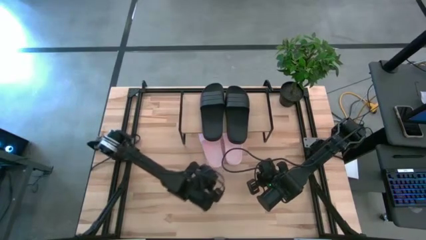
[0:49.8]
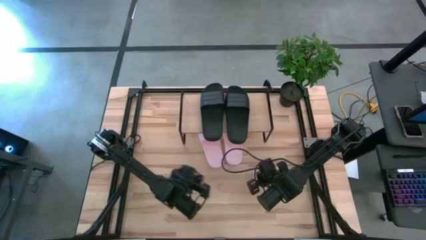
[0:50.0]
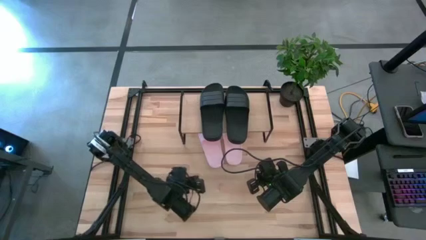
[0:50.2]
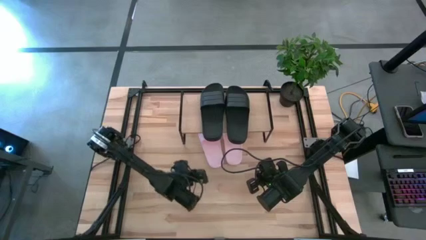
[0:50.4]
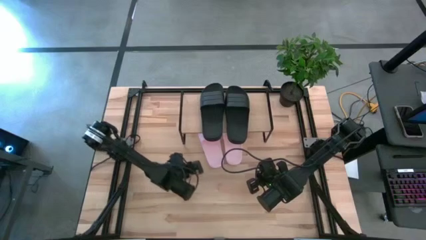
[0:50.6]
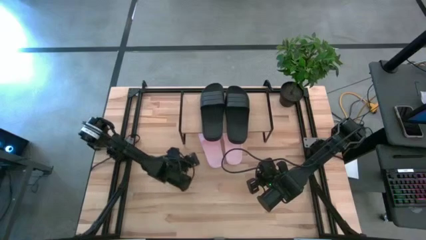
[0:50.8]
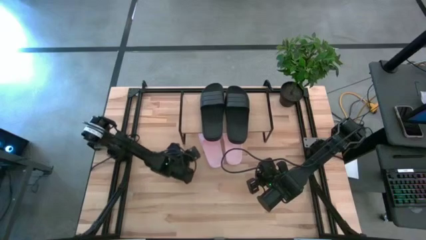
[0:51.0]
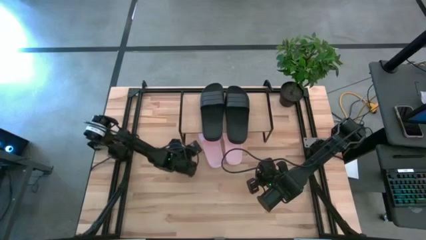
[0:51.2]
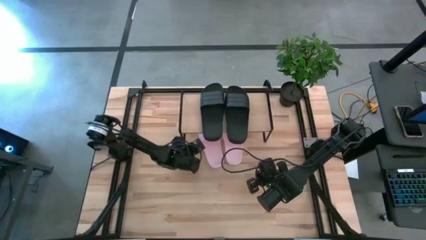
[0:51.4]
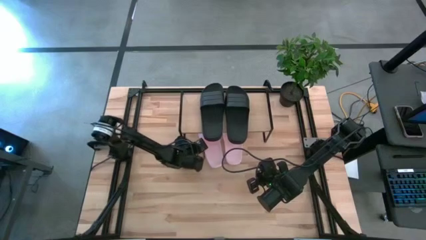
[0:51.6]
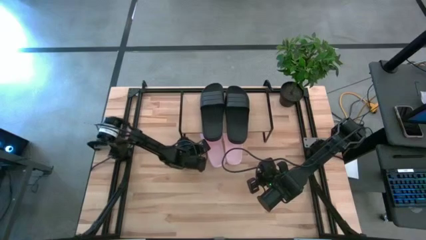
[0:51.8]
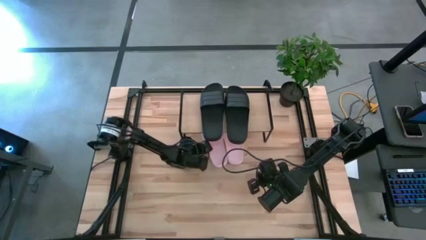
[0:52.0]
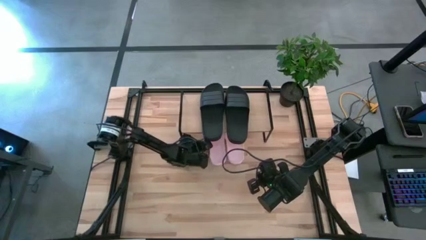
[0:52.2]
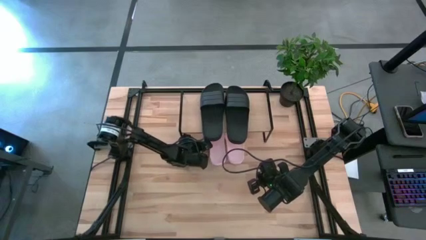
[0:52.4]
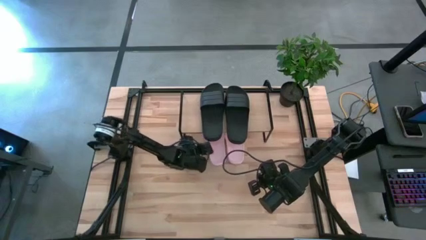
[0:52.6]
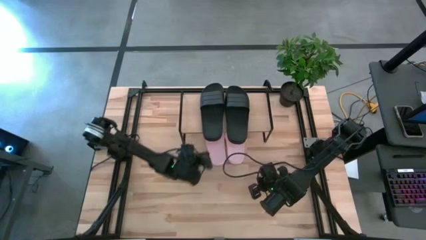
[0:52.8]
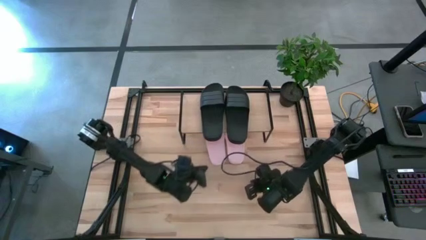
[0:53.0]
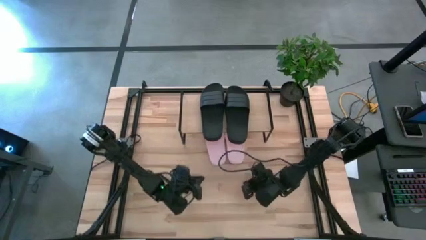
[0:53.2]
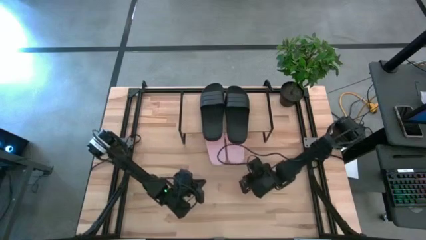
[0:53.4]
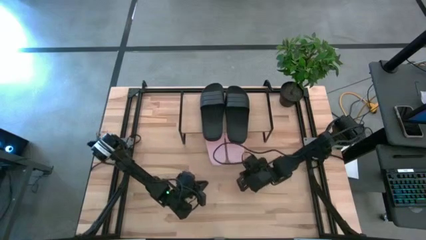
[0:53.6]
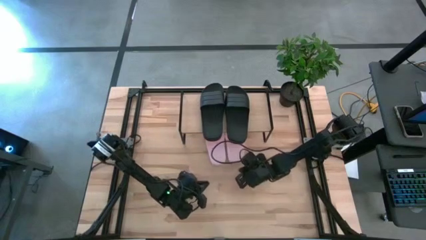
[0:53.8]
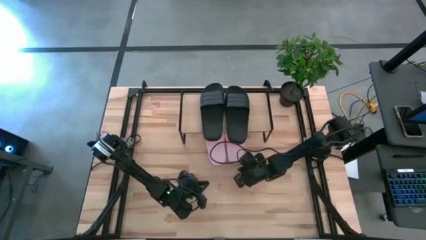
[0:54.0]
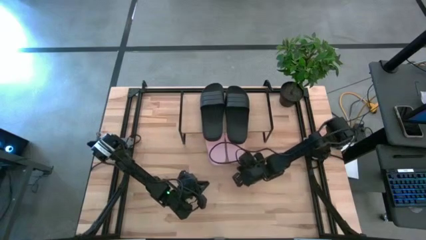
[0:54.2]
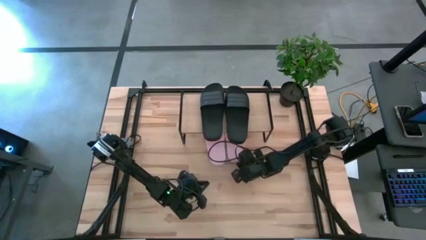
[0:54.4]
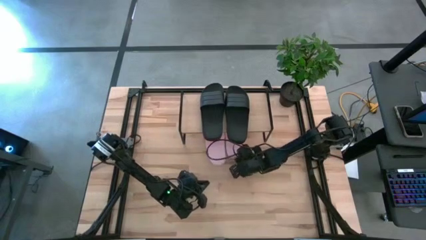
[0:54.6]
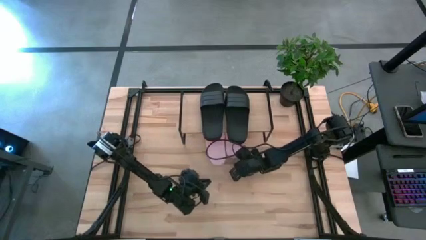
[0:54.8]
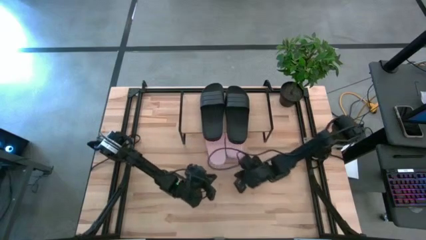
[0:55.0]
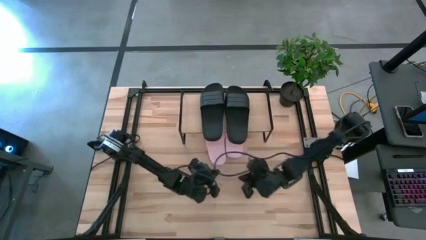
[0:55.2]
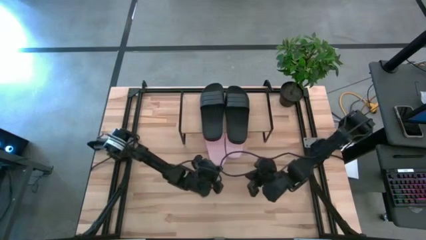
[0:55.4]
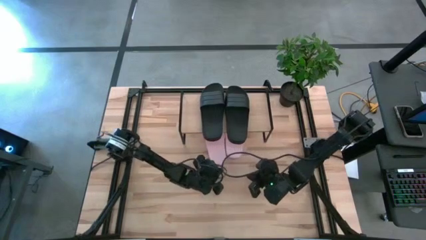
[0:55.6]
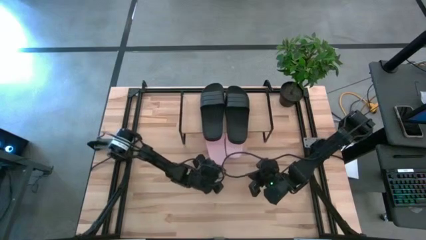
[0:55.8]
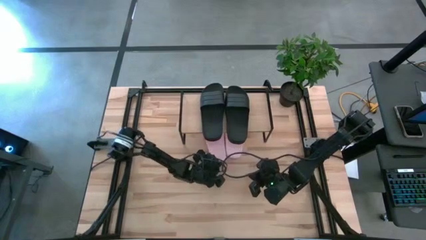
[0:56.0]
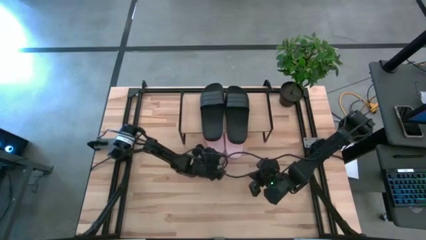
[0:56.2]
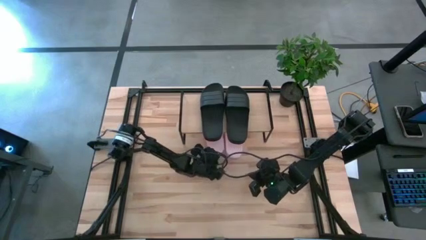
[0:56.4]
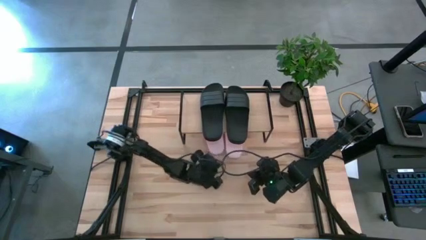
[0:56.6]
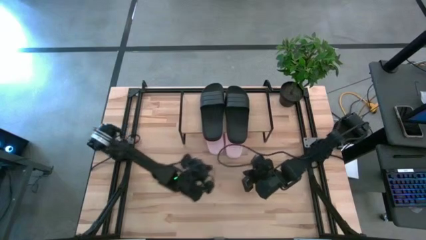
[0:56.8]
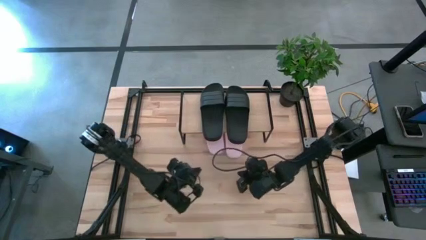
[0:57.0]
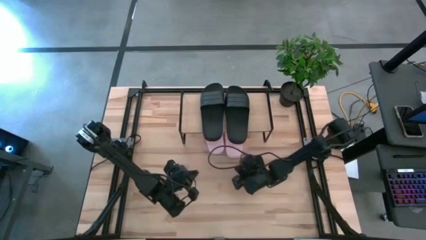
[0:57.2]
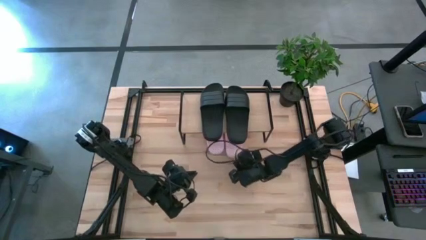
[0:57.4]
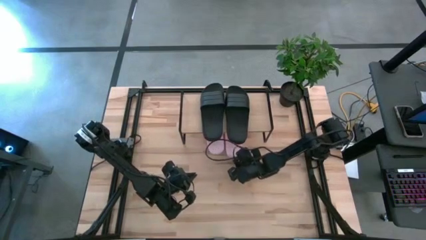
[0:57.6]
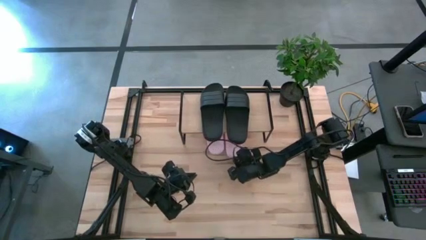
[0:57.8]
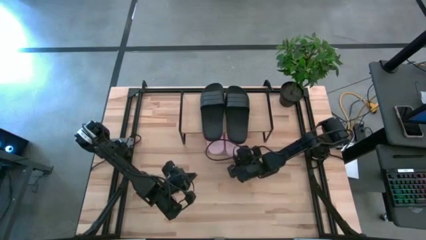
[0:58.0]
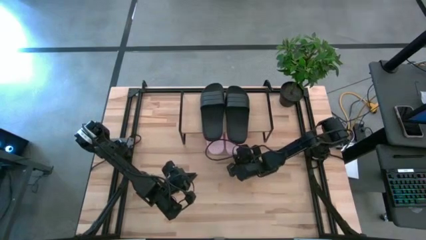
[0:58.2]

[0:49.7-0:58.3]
Task: Pick and place slides into the shelf
Adjust the pink slides

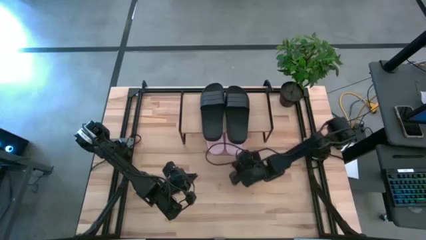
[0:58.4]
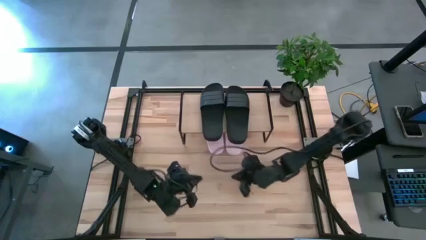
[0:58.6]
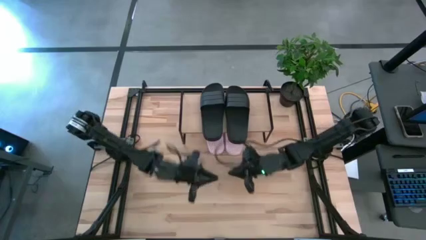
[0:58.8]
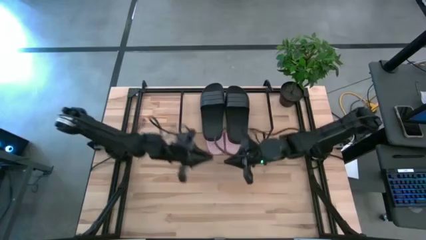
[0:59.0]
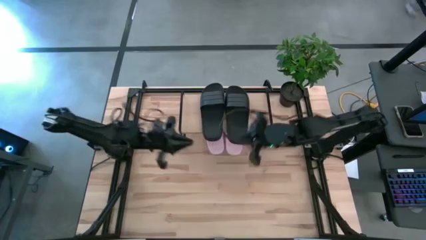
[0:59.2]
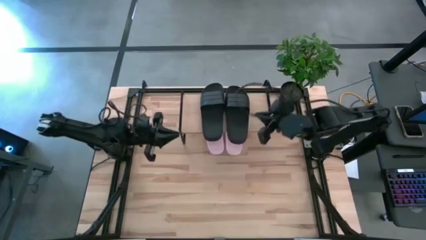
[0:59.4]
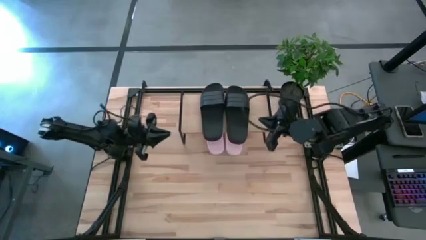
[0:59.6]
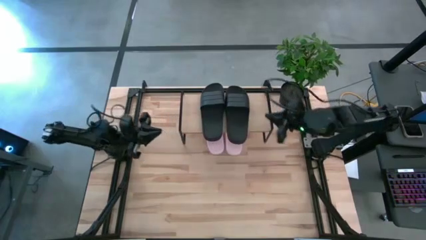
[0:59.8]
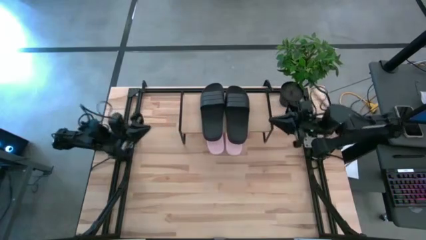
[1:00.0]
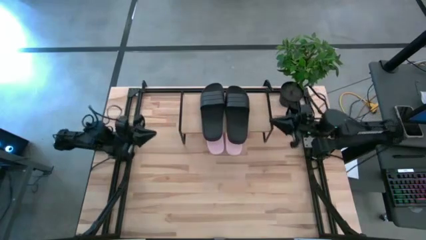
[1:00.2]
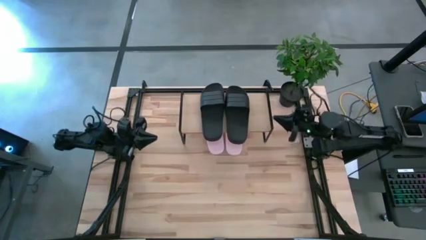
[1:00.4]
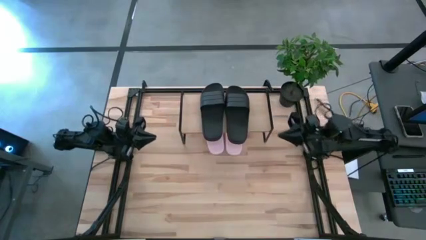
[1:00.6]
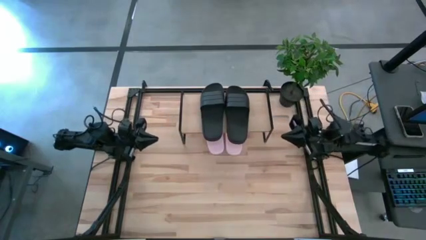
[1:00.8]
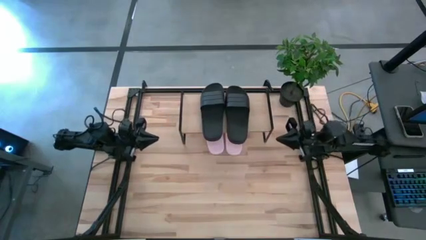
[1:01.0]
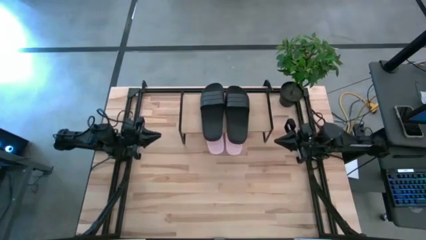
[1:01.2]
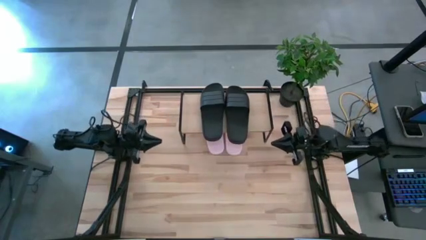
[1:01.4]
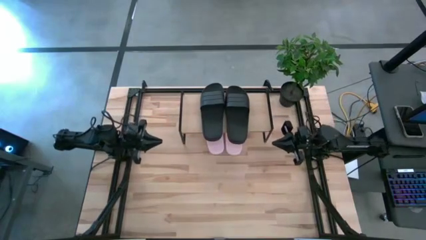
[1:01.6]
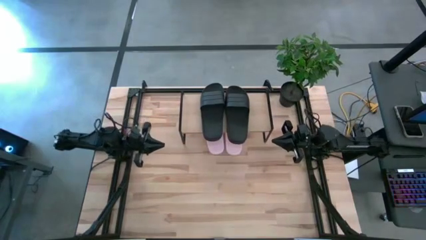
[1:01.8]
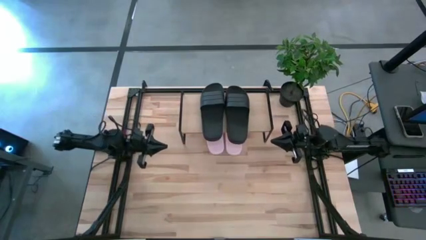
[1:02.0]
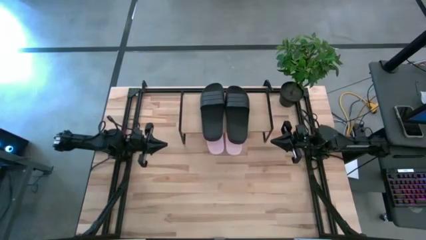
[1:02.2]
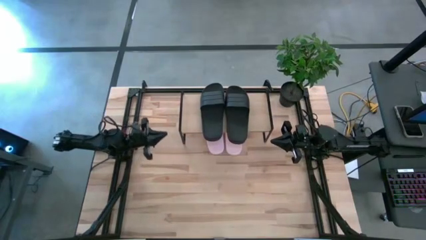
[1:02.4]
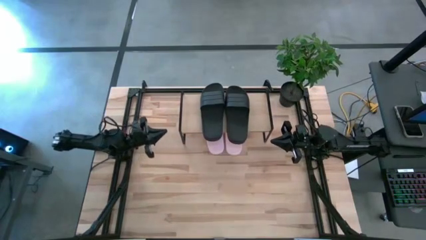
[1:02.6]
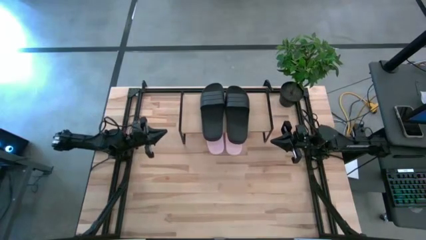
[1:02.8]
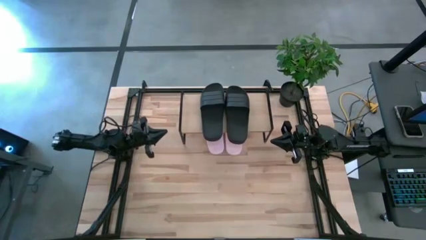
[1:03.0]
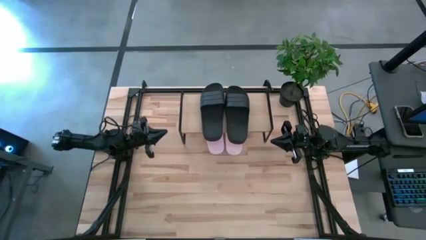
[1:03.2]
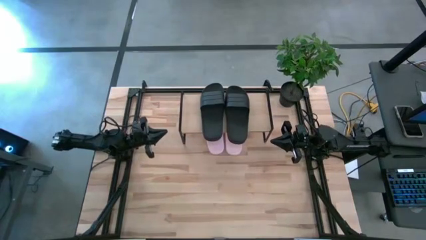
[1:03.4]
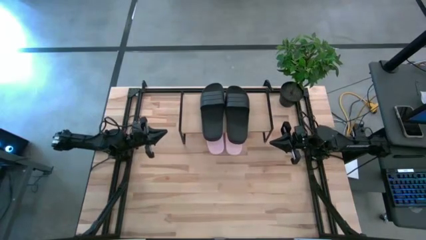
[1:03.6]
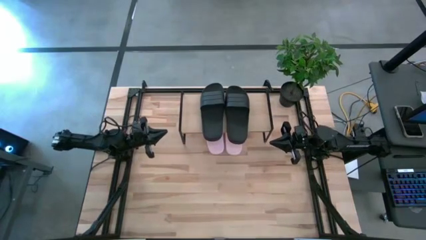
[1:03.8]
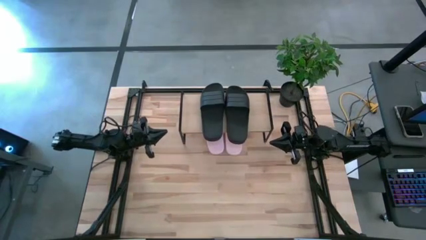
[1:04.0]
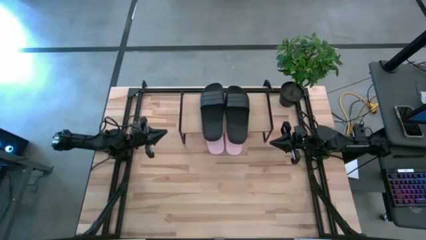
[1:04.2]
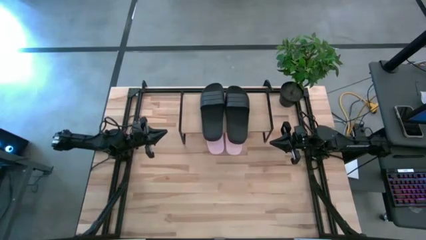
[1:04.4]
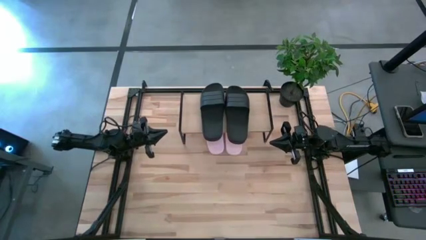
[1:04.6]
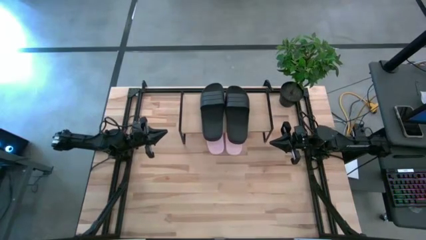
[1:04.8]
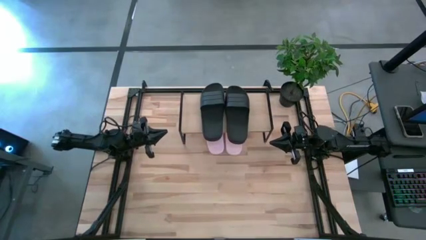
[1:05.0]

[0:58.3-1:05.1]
Return to home position

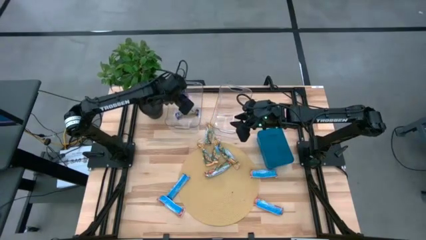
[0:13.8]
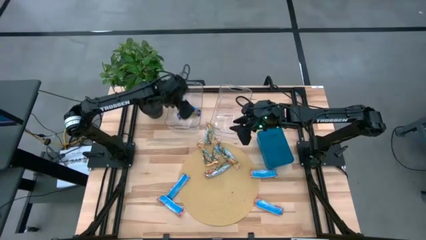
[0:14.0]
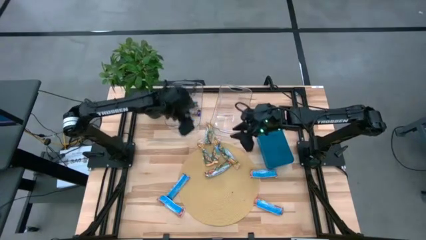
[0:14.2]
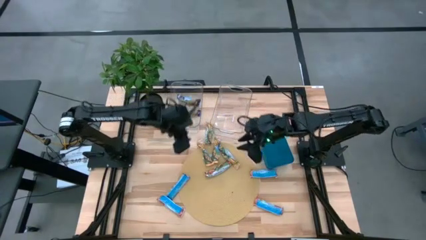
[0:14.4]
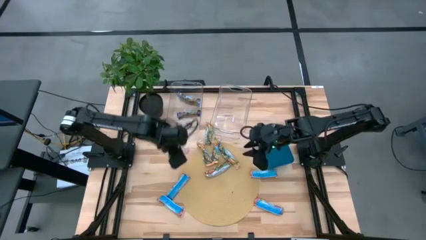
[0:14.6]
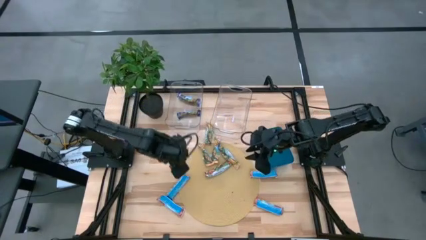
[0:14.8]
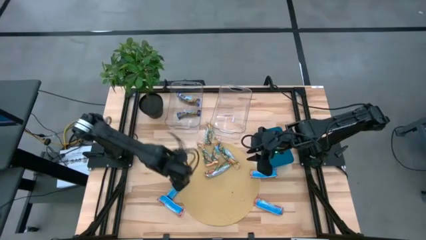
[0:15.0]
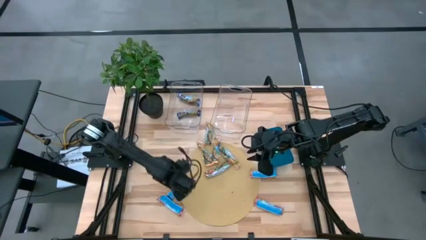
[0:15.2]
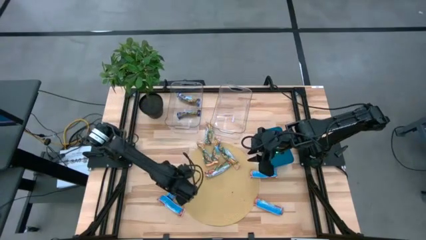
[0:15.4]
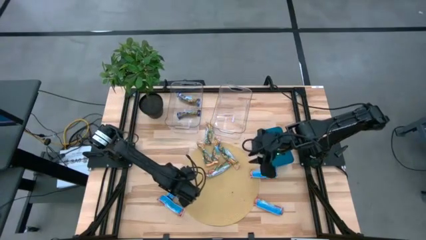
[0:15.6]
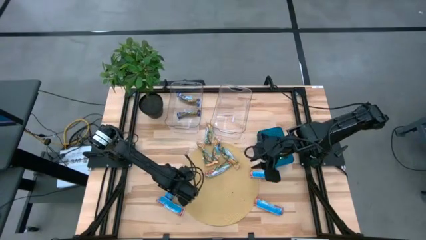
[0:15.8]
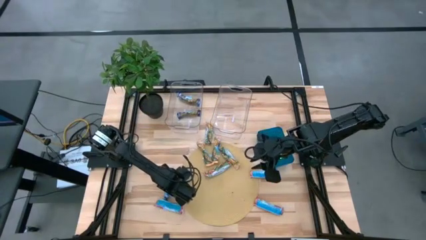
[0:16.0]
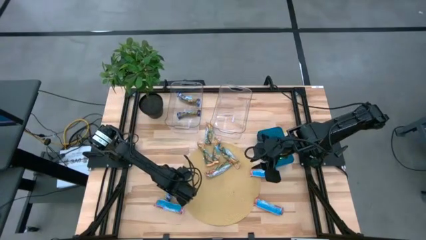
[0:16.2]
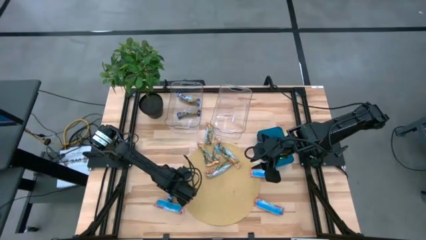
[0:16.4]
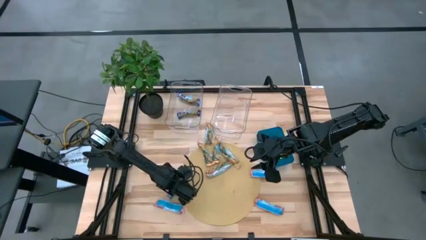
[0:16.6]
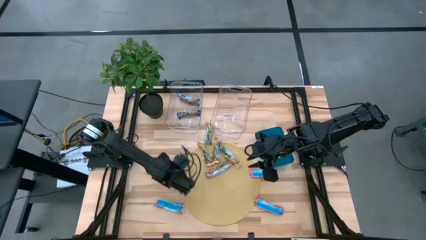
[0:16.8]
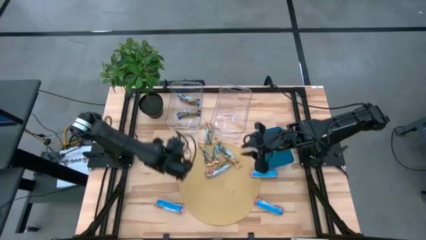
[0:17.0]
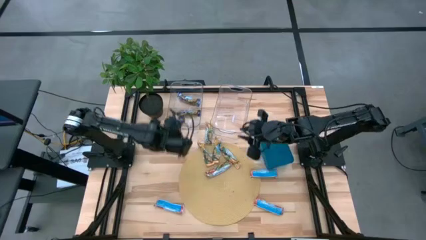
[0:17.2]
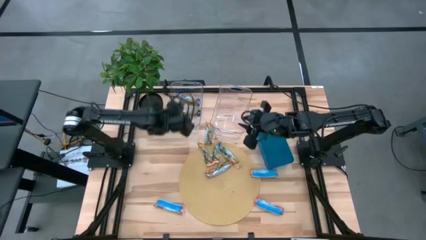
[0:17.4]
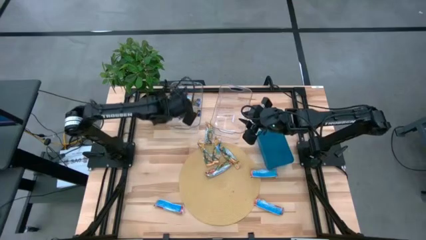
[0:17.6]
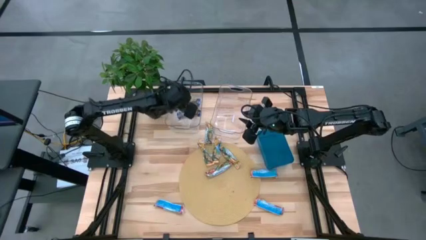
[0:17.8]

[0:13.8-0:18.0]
Task: Pick and place Granola Bars by type
Put the blue granola bar into the left transparent bin
